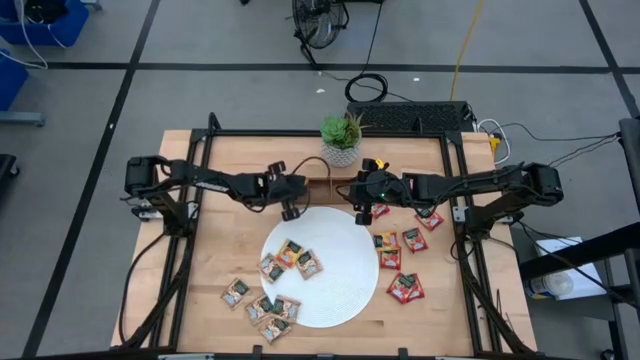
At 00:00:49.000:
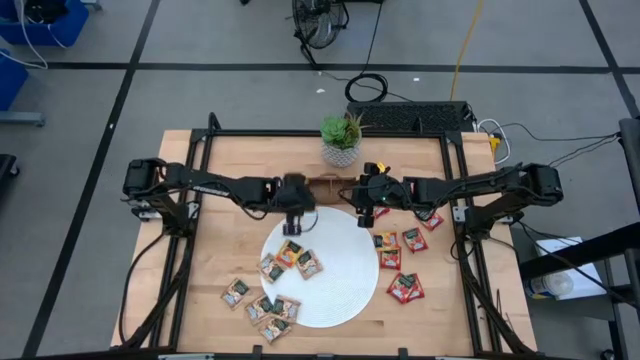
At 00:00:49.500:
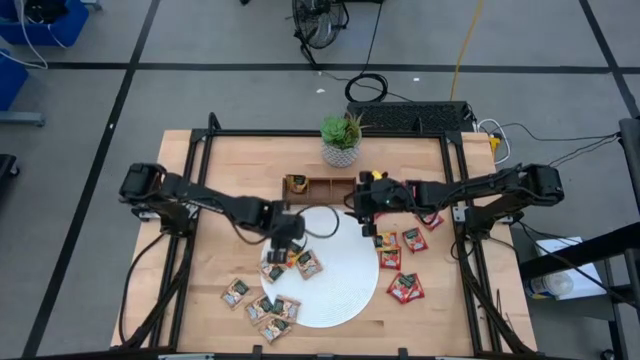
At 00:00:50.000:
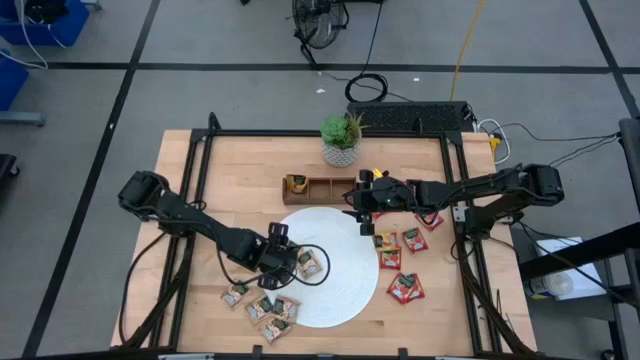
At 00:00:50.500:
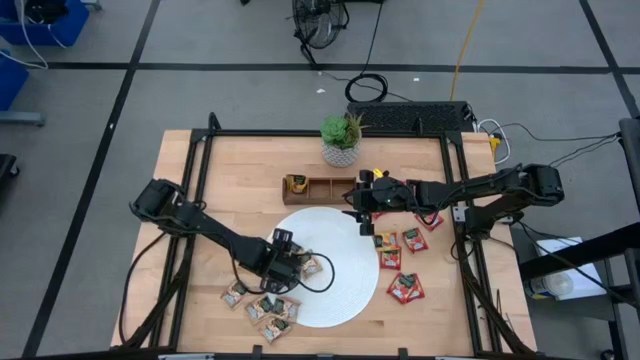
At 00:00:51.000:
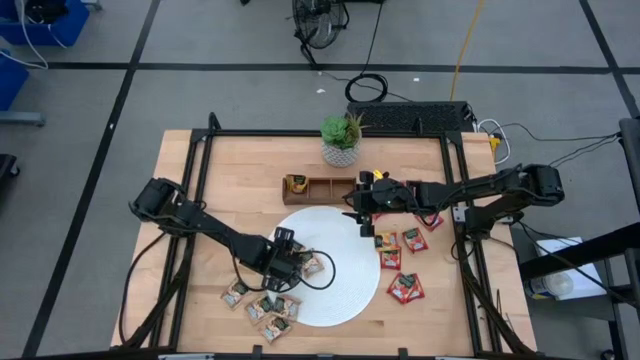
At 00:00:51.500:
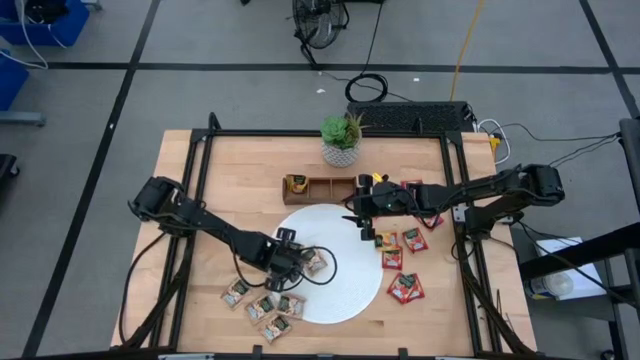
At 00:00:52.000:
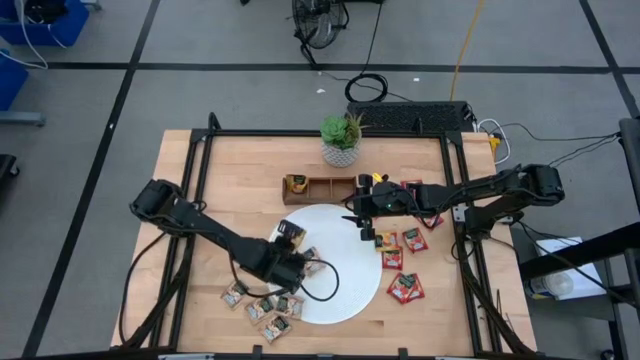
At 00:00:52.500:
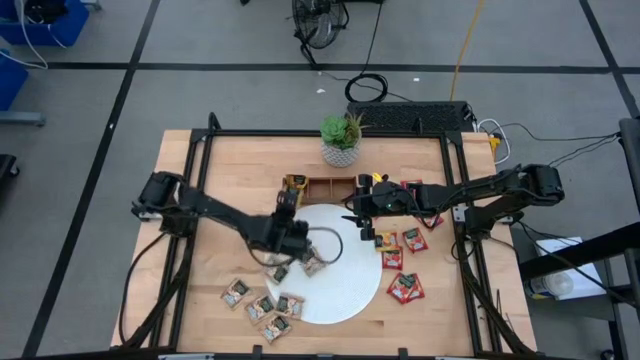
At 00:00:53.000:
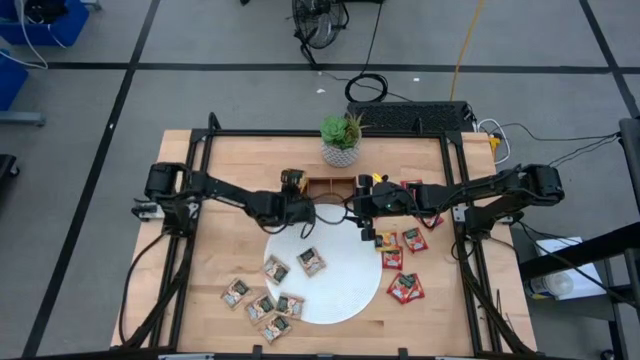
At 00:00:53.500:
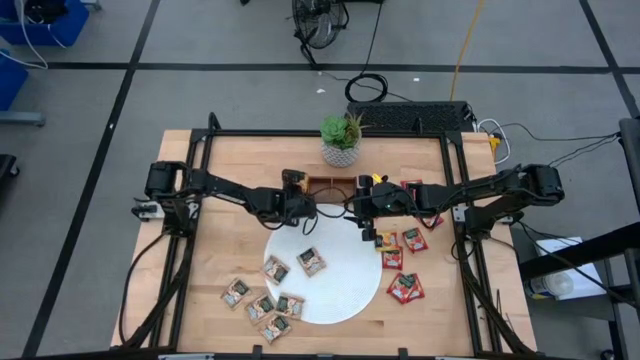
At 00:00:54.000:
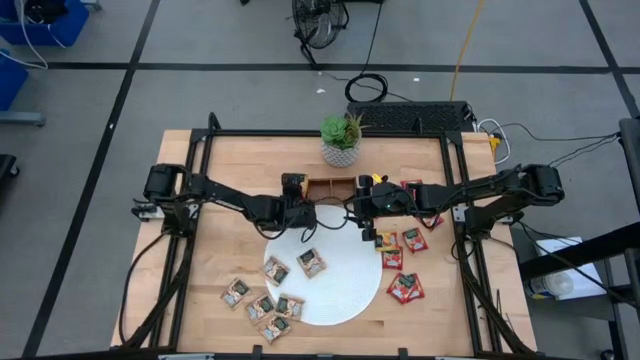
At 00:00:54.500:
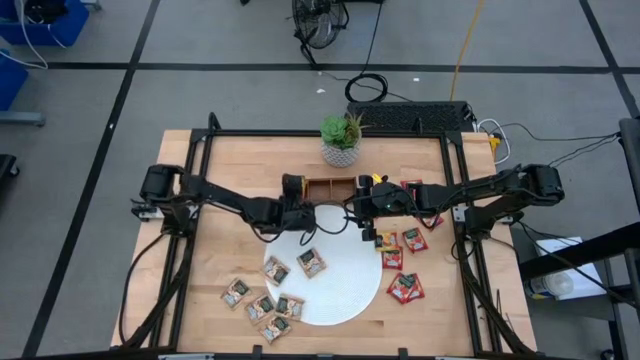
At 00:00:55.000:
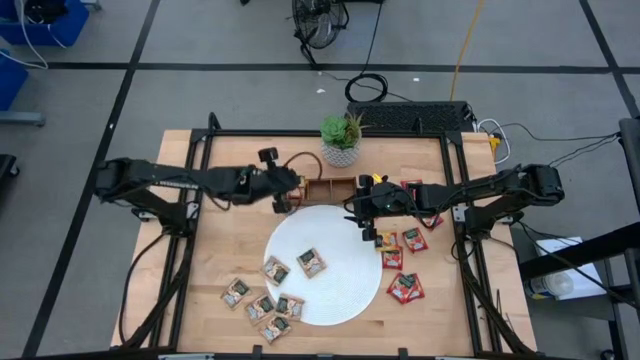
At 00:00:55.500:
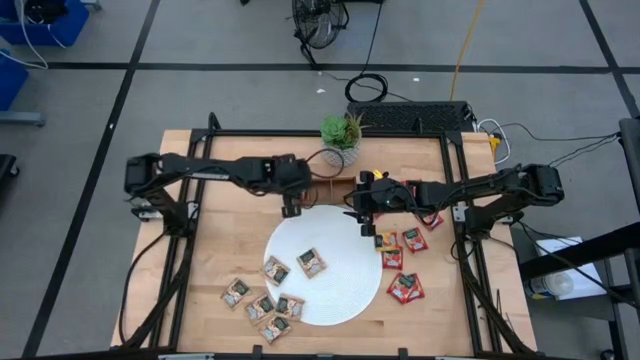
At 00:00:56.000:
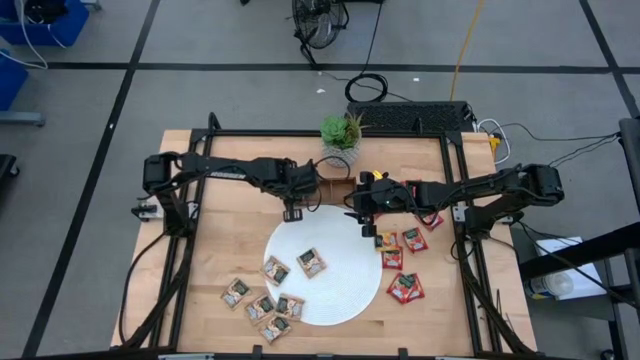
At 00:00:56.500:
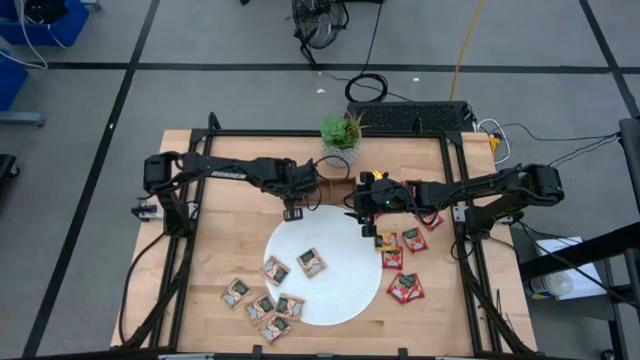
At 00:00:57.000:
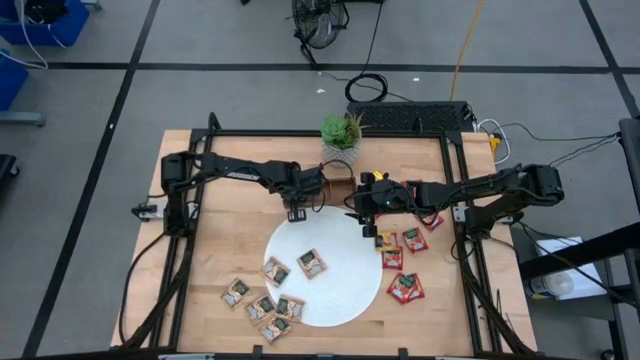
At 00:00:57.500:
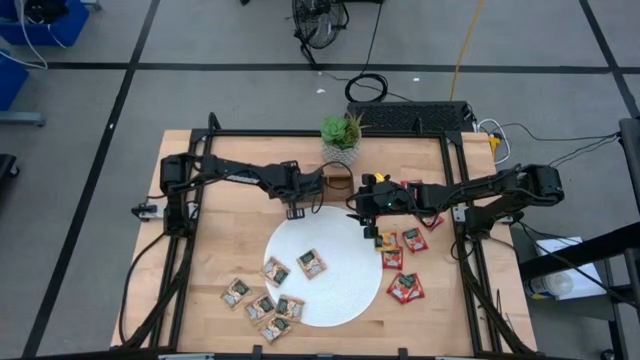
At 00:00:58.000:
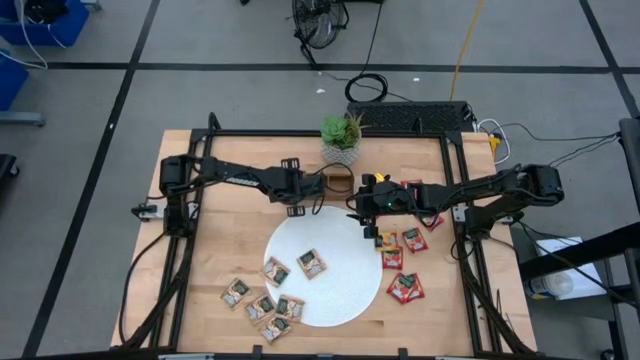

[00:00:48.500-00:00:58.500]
Task: Pick & Place Tea
Put the mango tea bag into the wooden organizer

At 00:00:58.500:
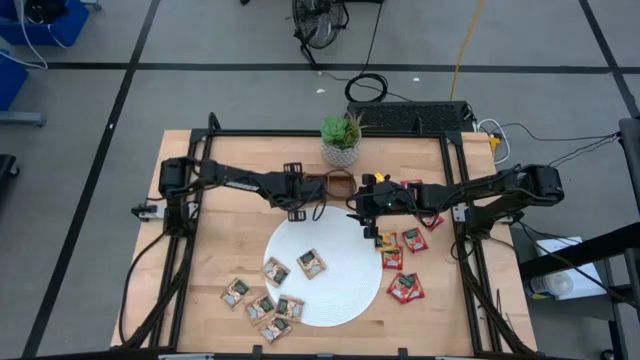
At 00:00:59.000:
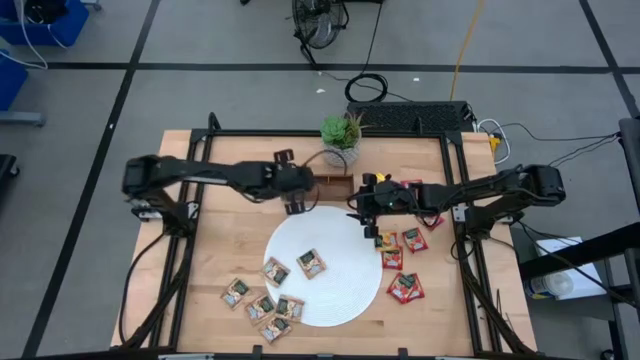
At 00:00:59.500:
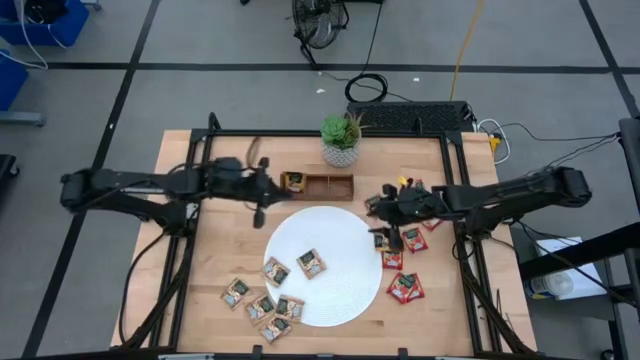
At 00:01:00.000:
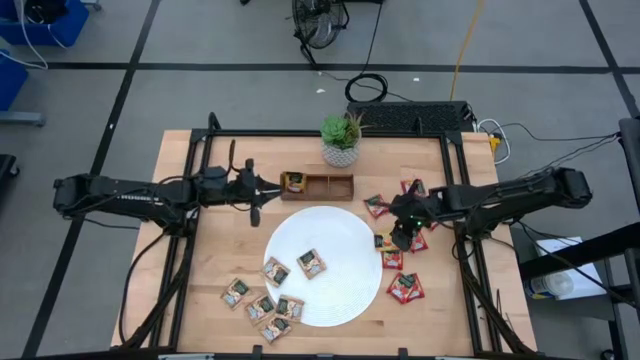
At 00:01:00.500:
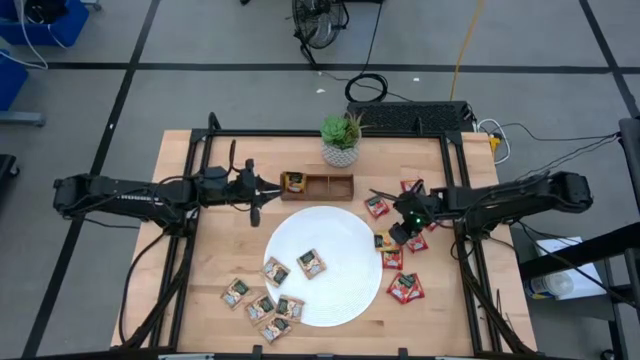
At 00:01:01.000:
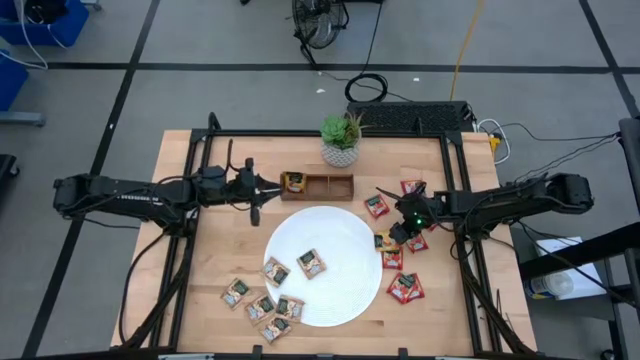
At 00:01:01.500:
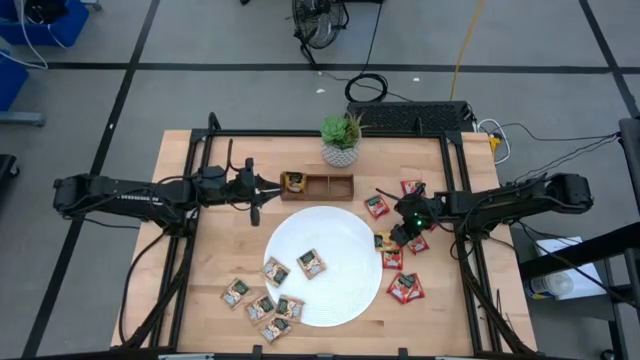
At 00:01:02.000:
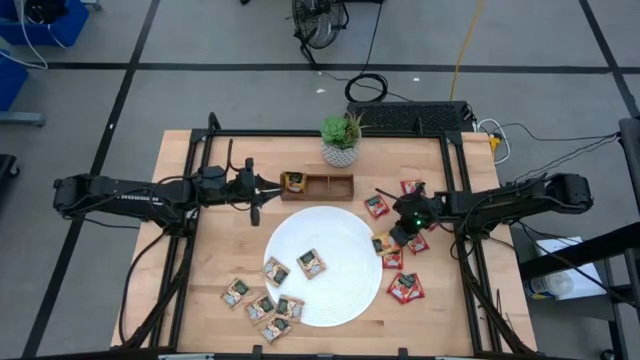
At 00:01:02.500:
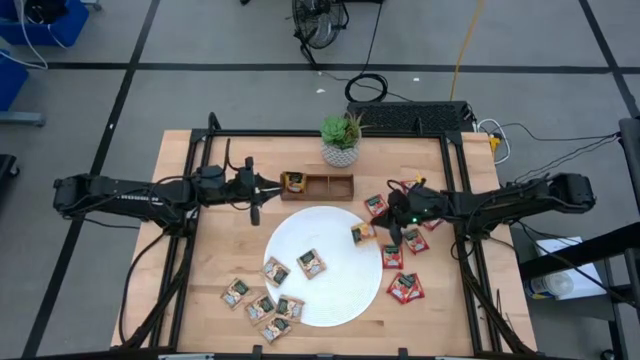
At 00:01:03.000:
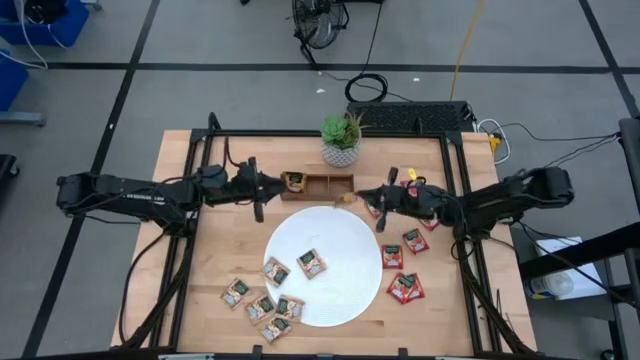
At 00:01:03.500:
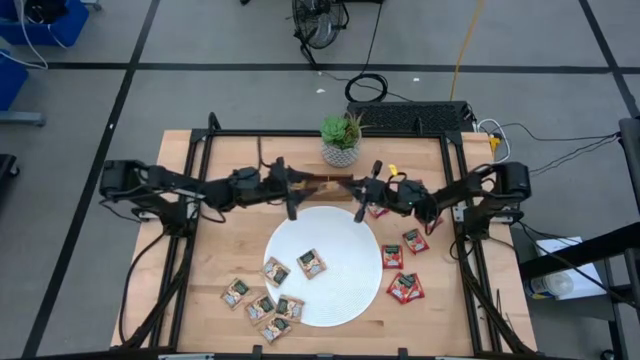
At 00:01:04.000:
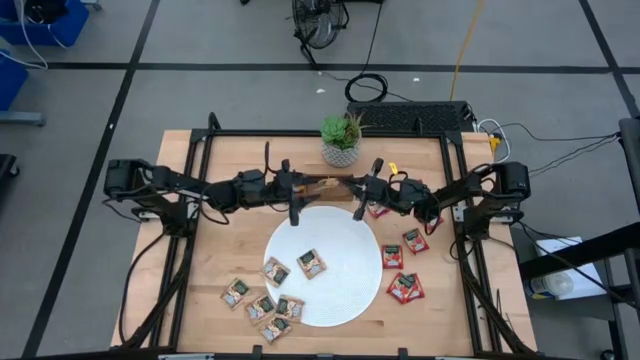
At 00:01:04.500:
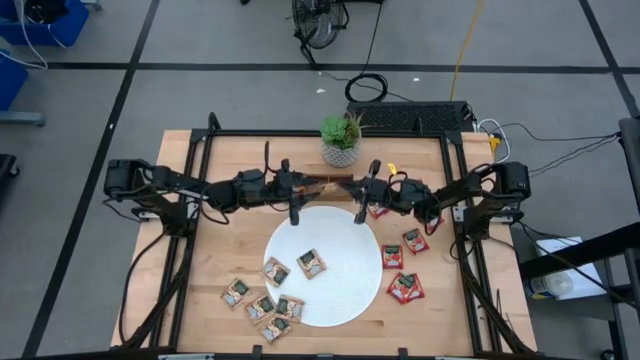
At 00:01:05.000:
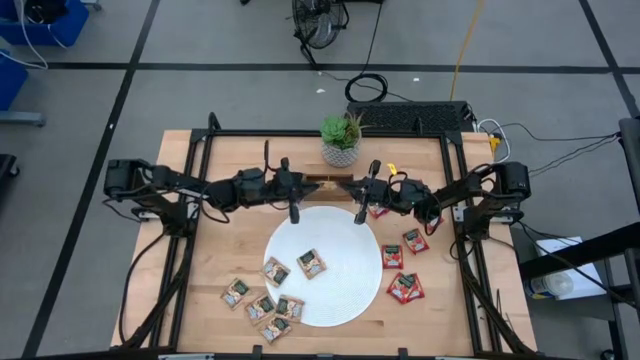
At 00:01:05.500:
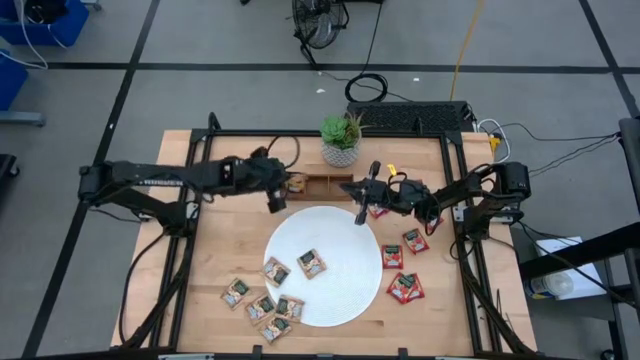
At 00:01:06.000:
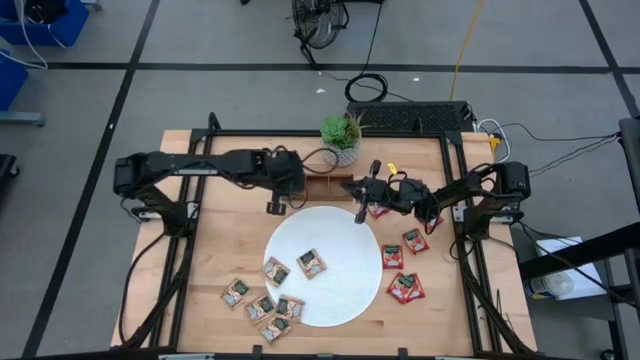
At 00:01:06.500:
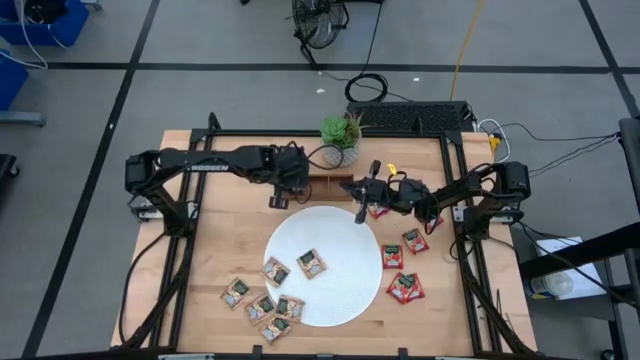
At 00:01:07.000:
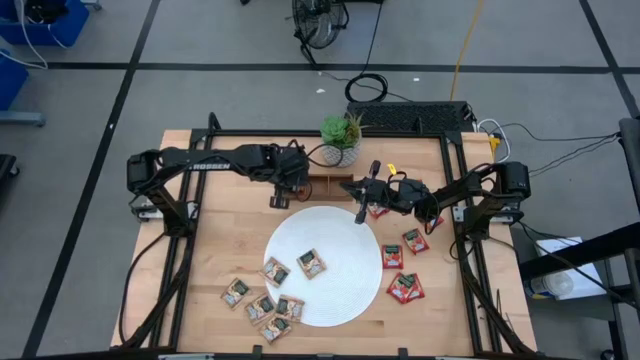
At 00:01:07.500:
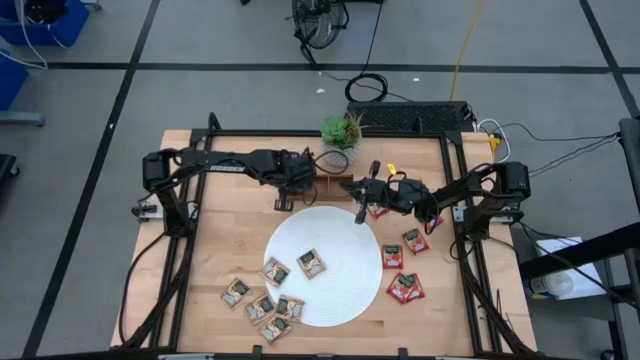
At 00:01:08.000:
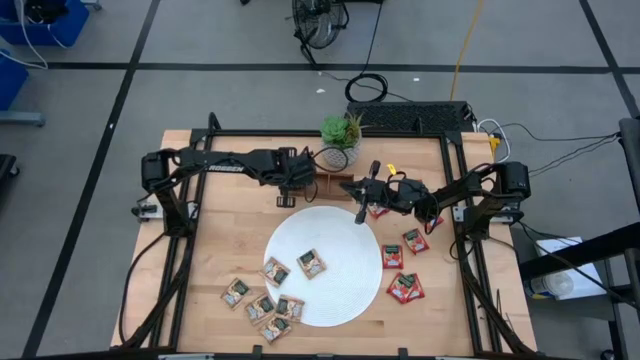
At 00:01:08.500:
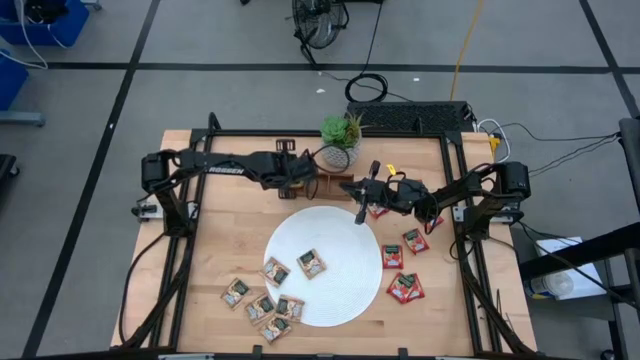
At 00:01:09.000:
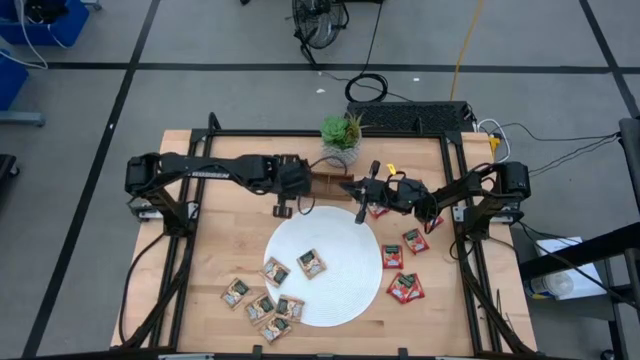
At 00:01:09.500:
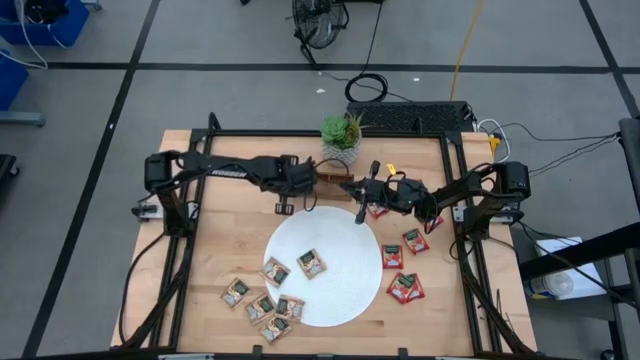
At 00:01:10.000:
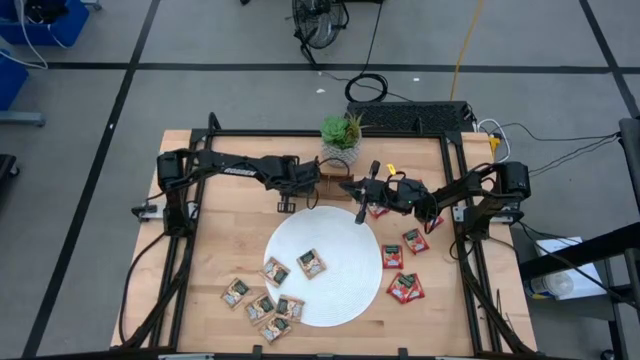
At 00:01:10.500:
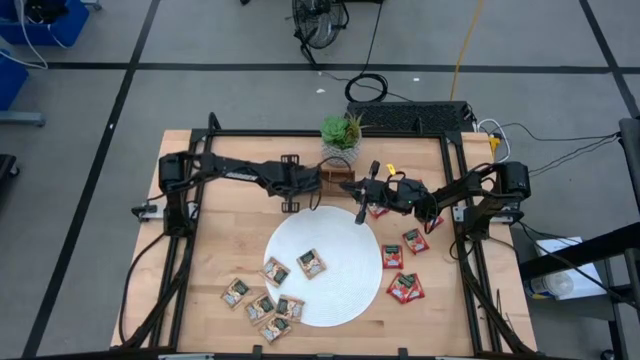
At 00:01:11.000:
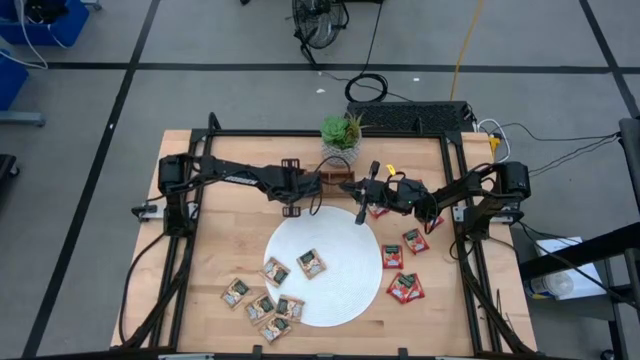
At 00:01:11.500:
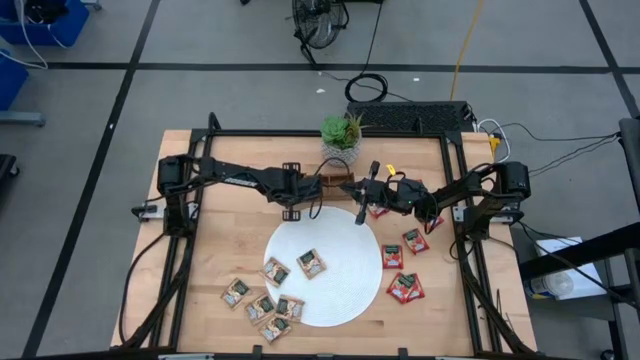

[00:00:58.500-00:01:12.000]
Put the mango tea bag into the wooden organizer
